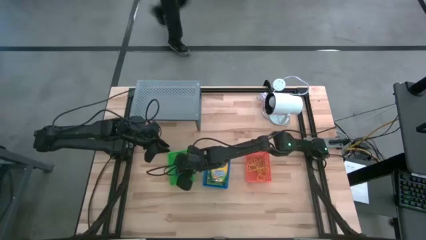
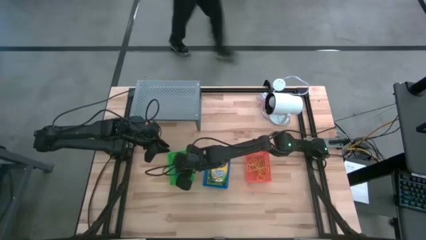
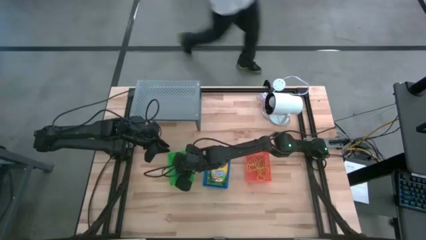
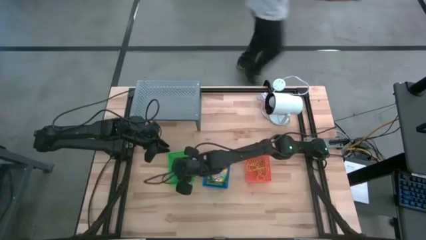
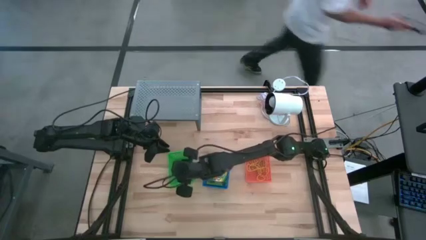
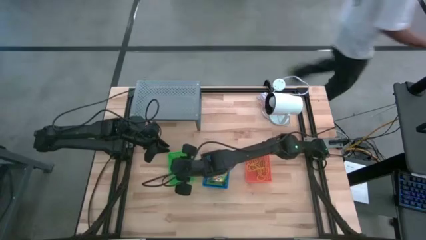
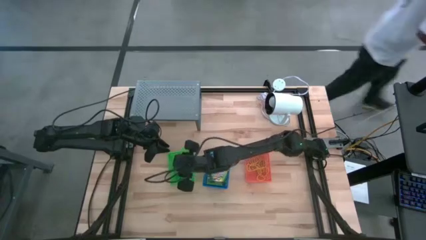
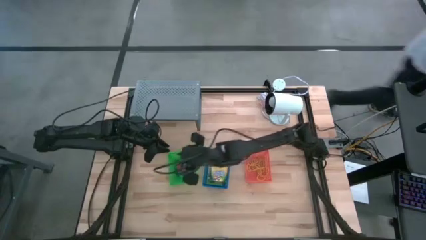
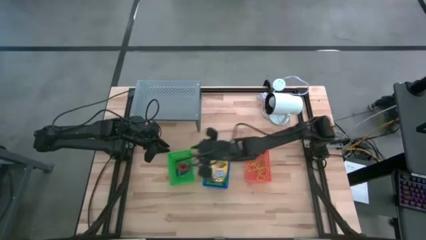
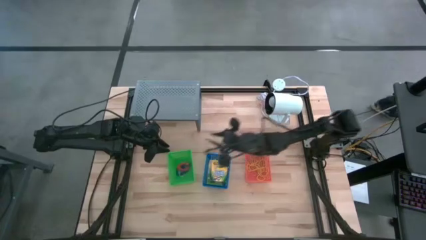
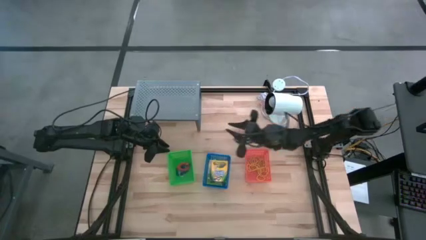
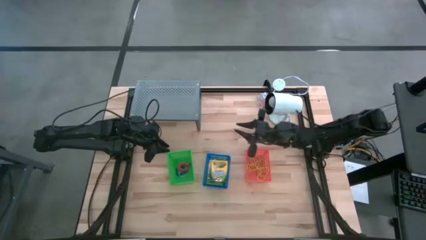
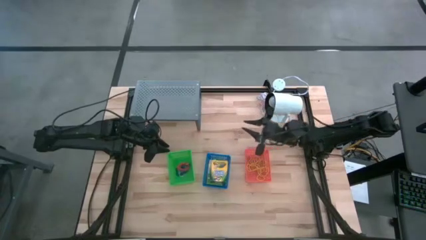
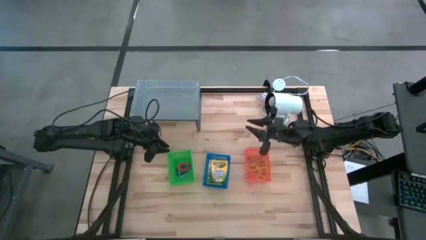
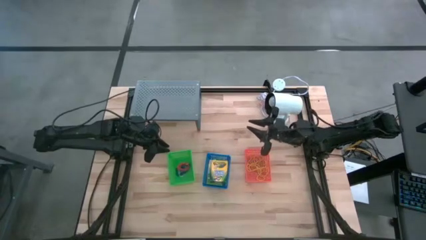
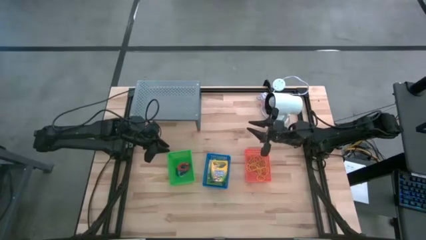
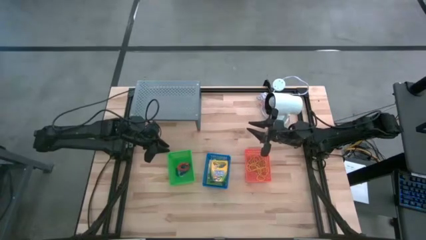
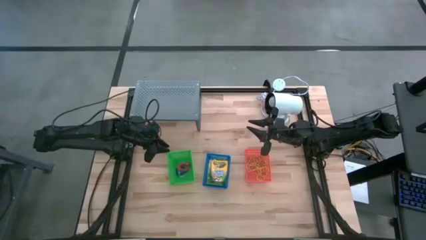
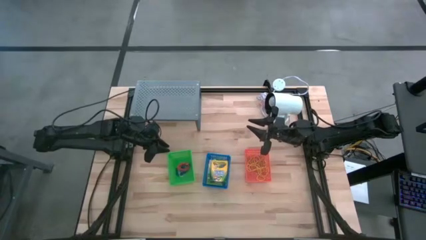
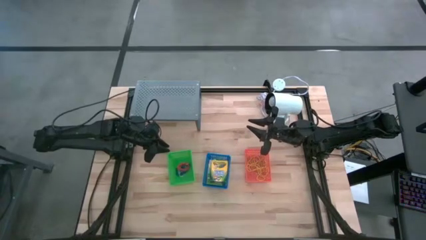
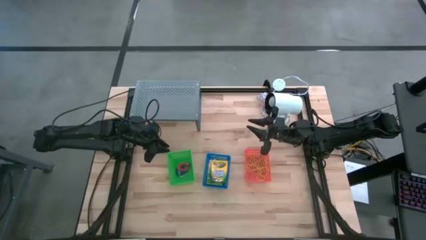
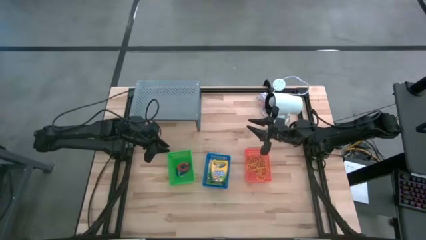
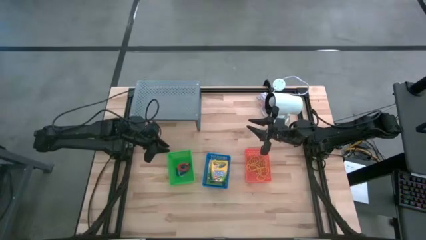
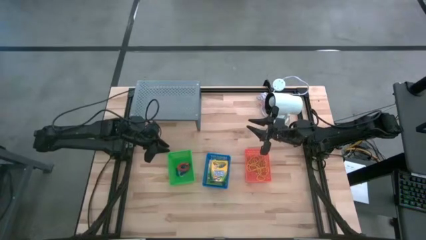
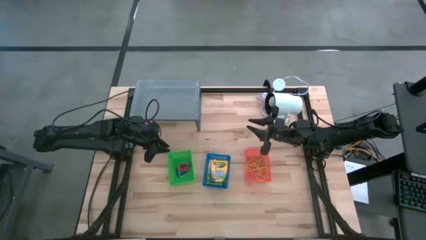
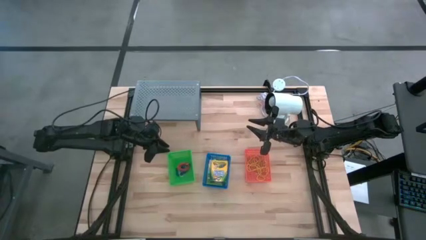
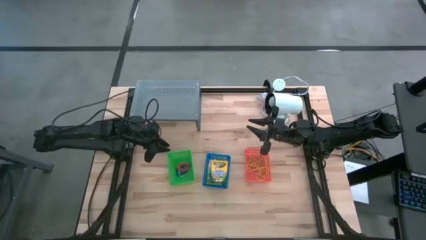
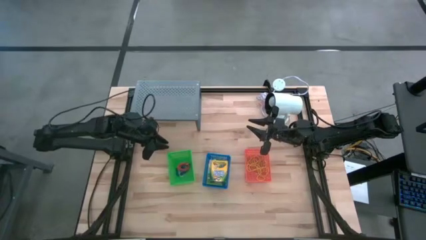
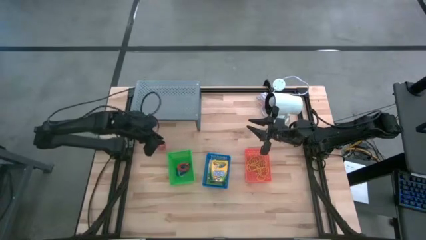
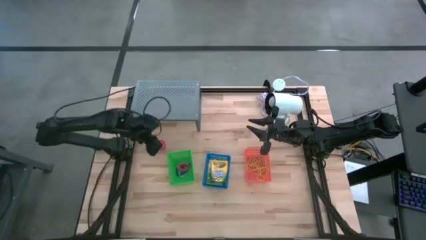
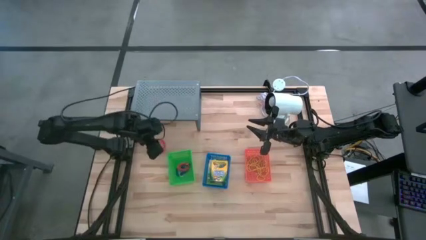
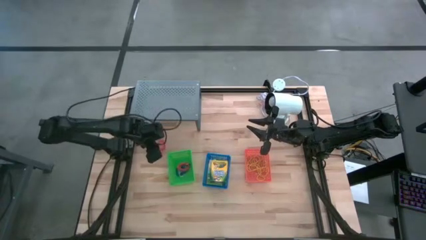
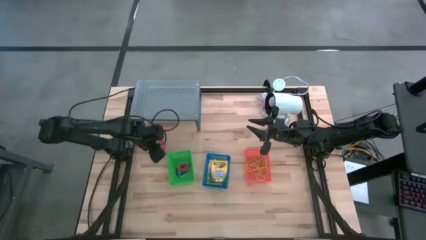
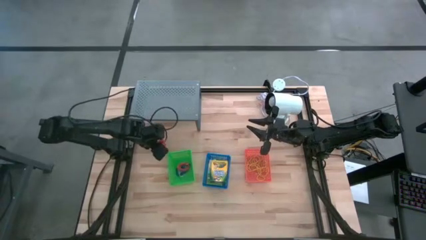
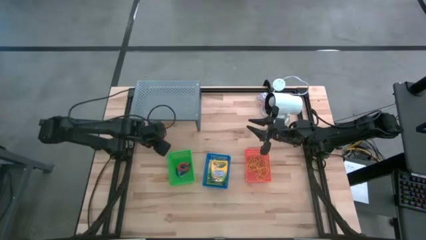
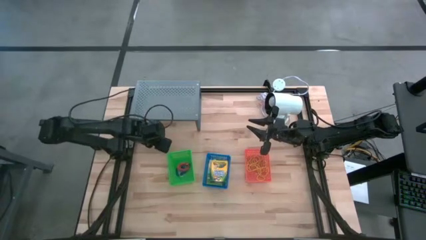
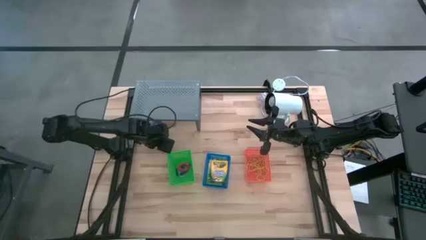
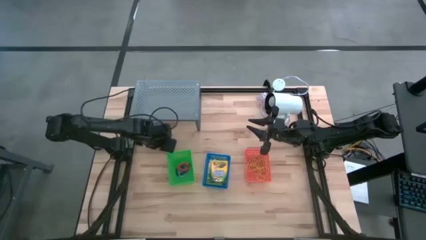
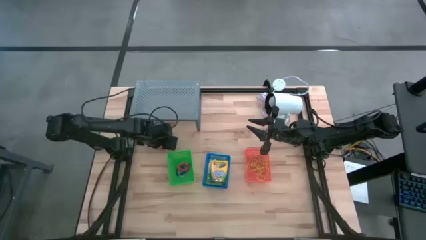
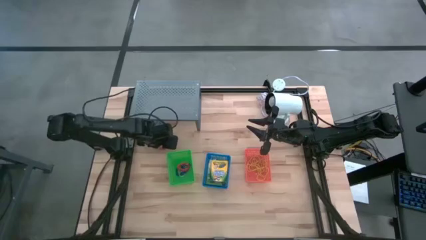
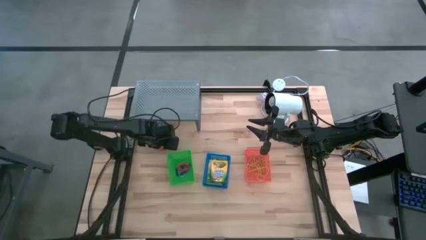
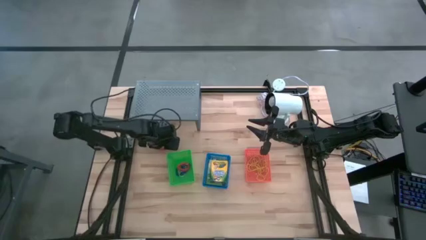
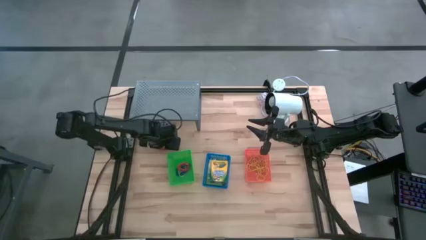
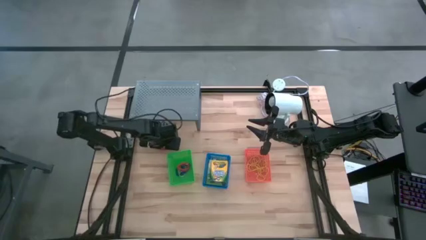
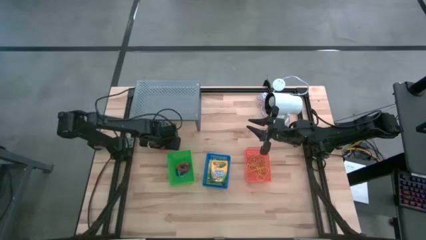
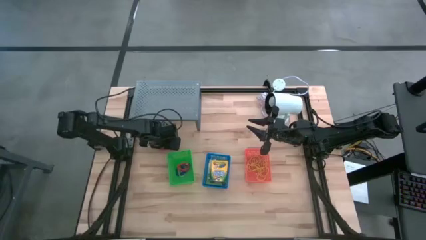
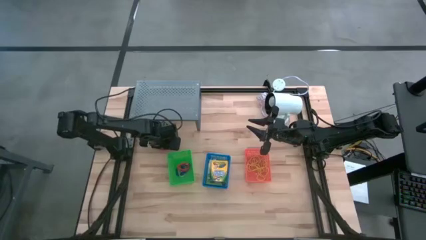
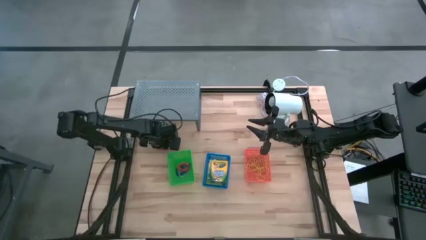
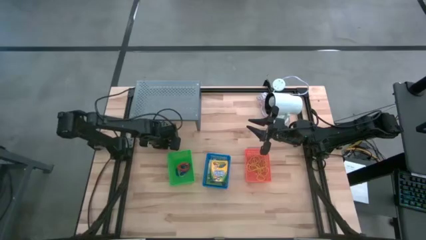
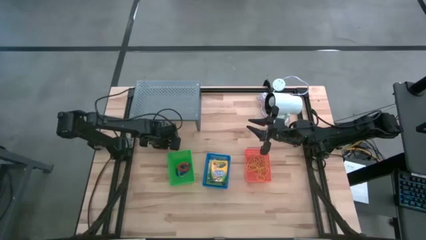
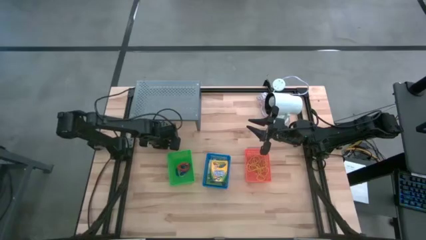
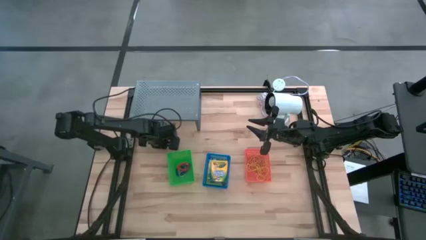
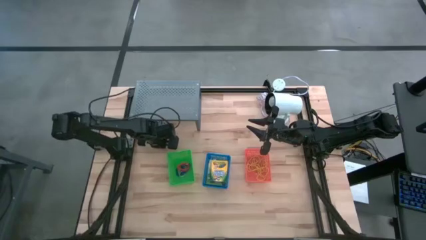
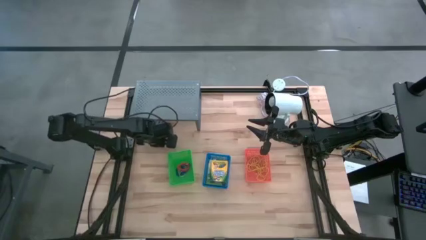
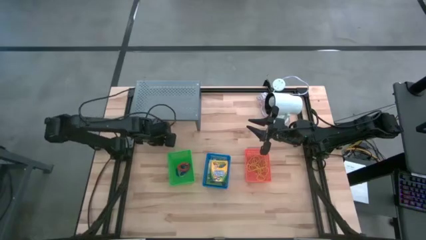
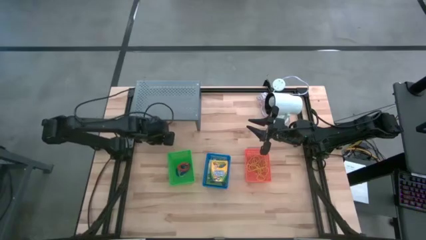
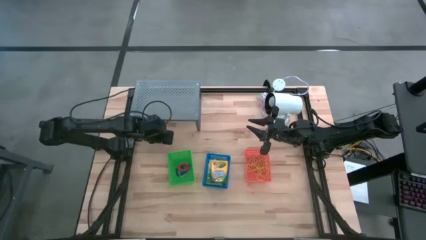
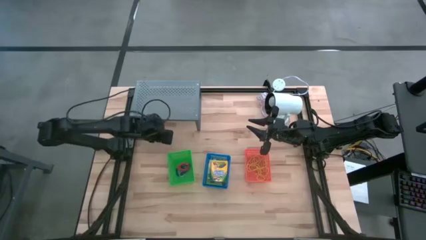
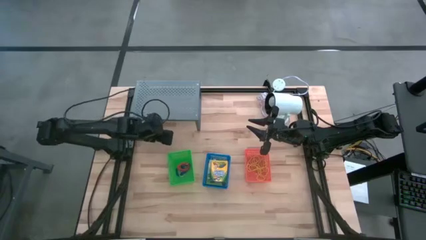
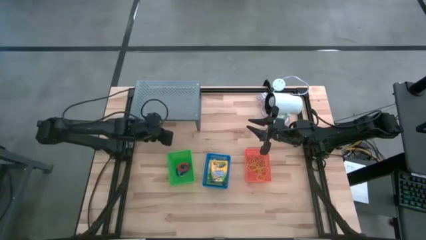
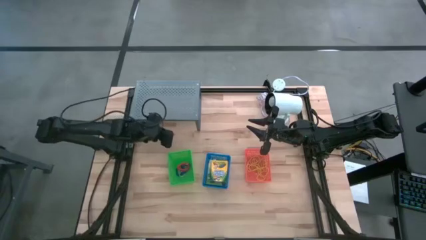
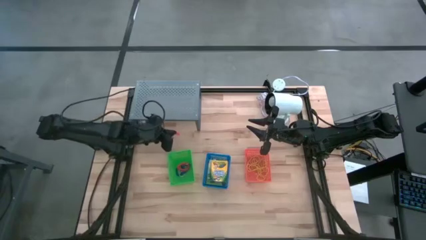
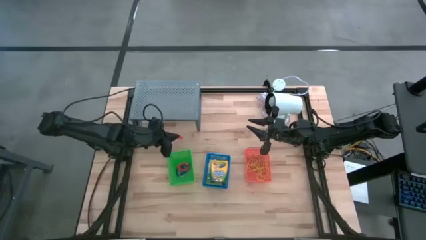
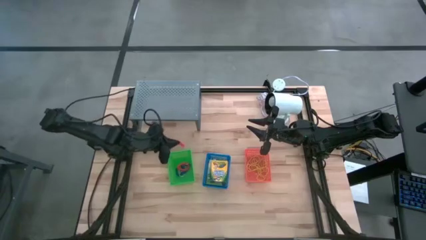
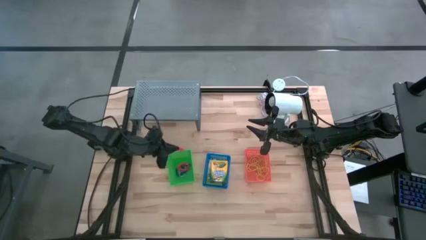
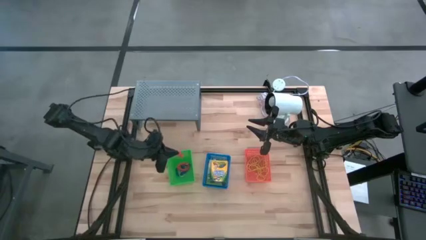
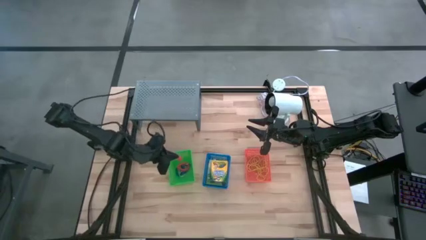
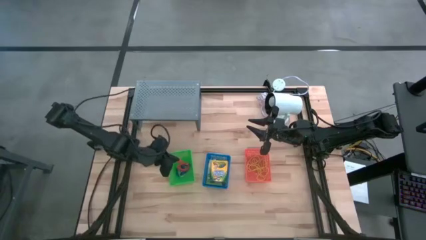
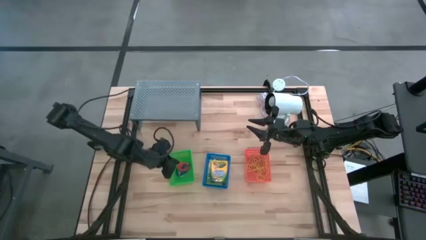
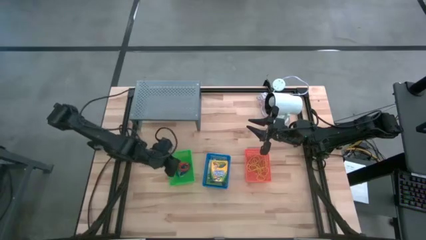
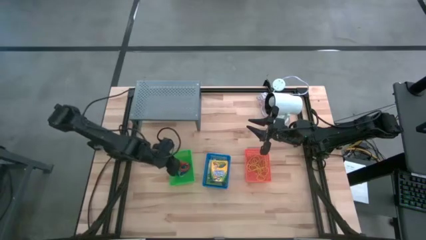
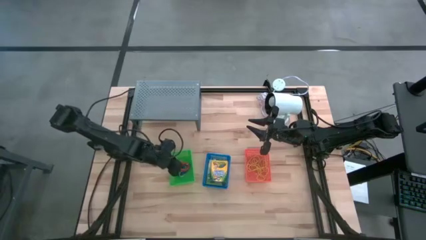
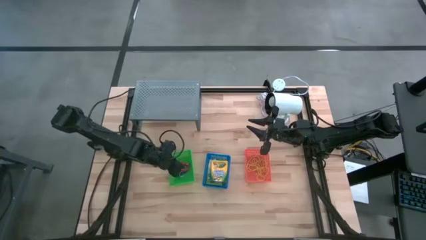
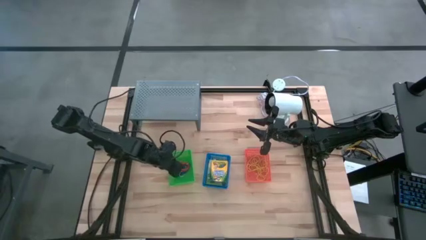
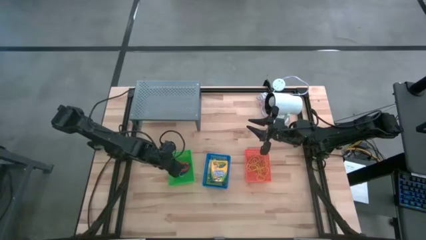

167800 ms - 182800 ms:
Task: Pick & Place Office Desk Supplies
Put the orange spring keychain into the green bin

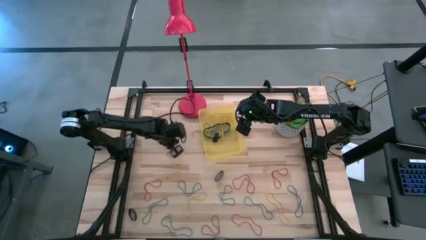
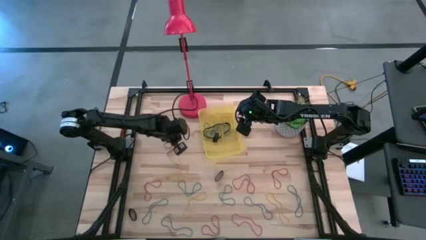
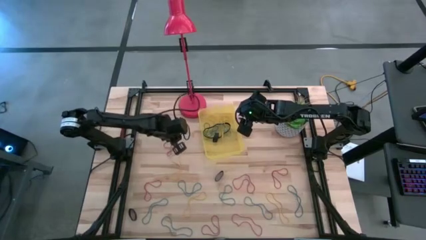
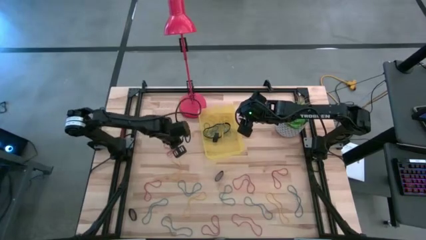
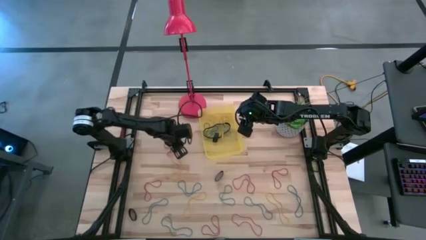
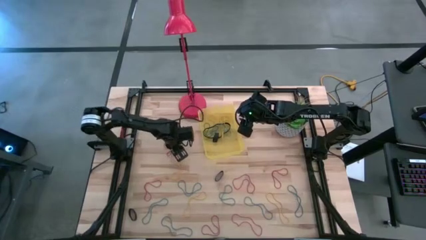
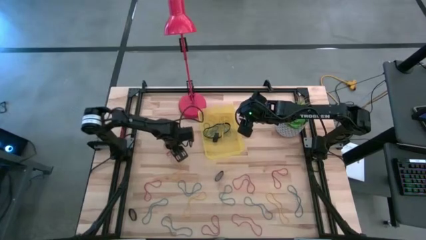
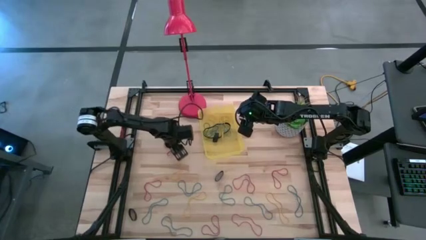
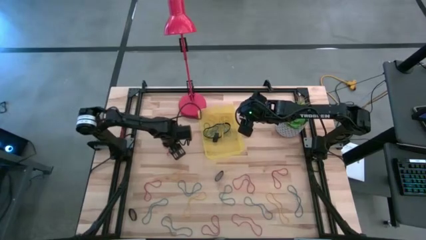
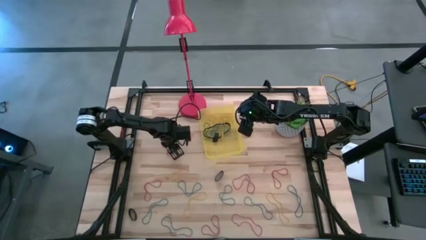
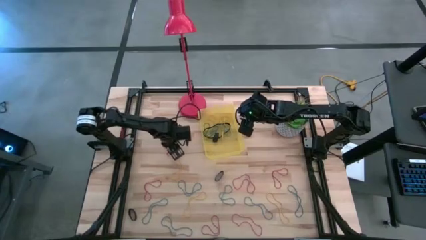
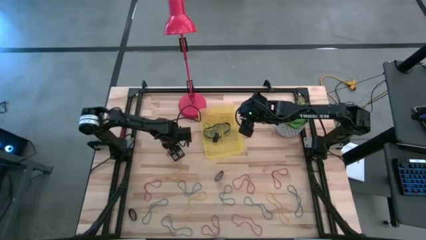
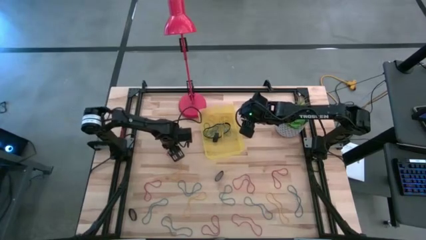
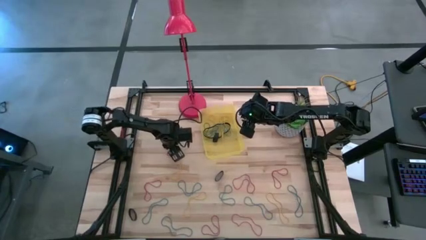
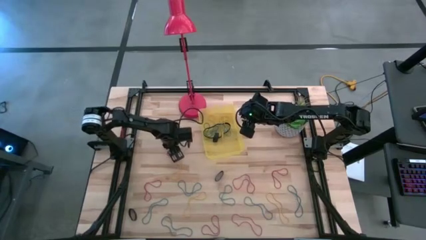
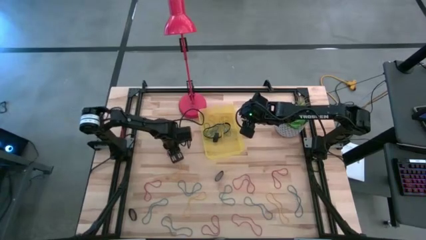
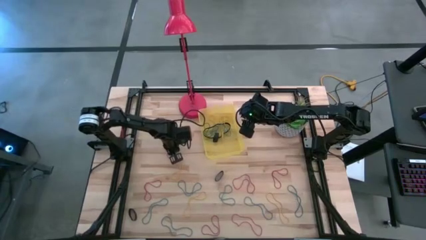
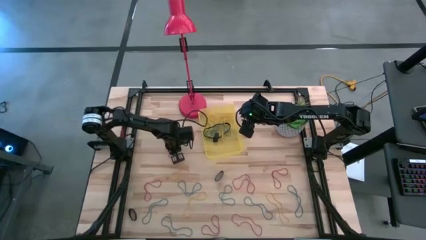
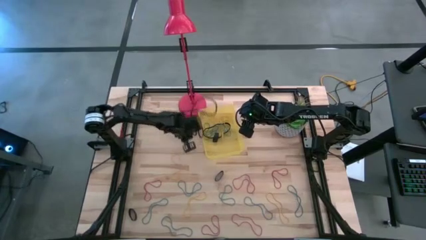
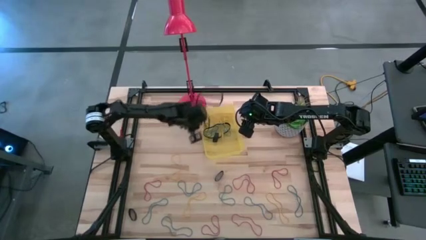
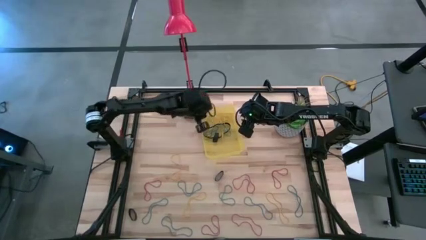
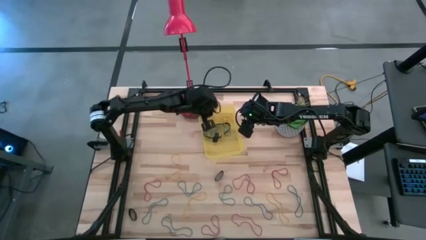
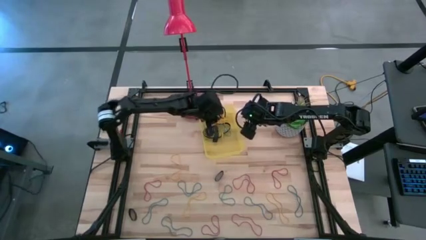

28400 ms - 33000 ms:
Task: Pick and place rubber bands into bin
Put the red rubber band into the yellow bin
